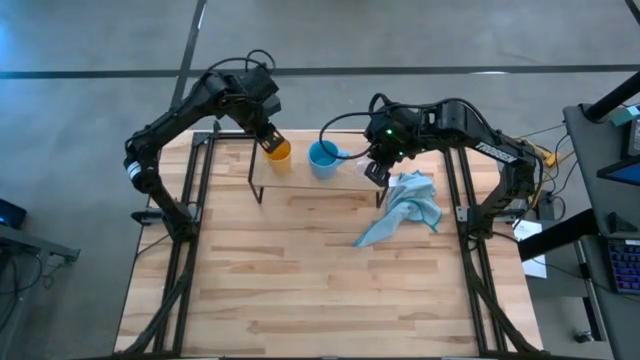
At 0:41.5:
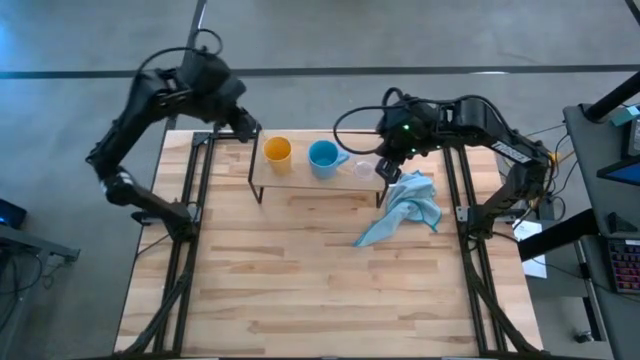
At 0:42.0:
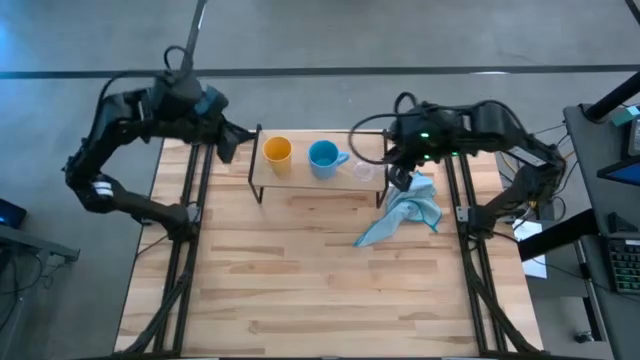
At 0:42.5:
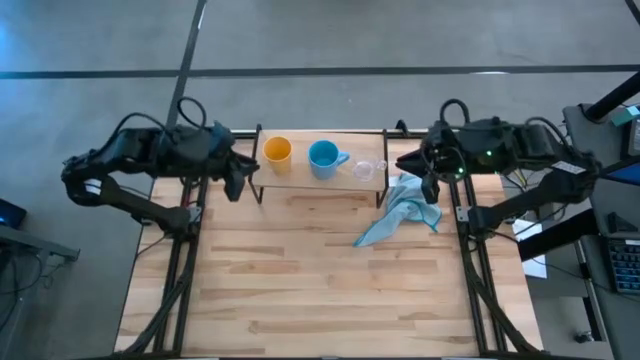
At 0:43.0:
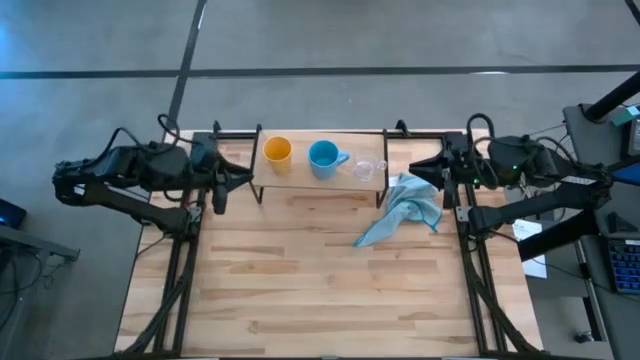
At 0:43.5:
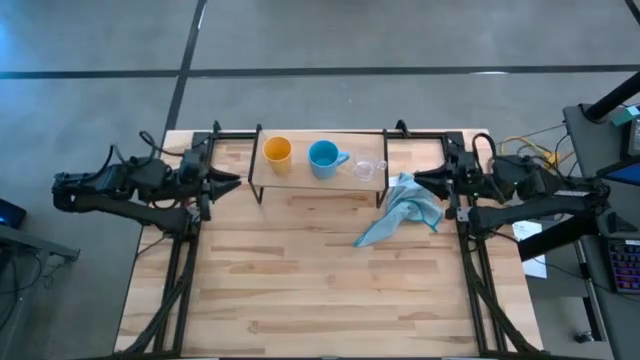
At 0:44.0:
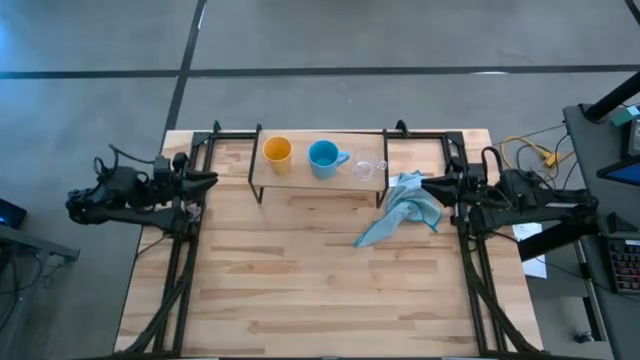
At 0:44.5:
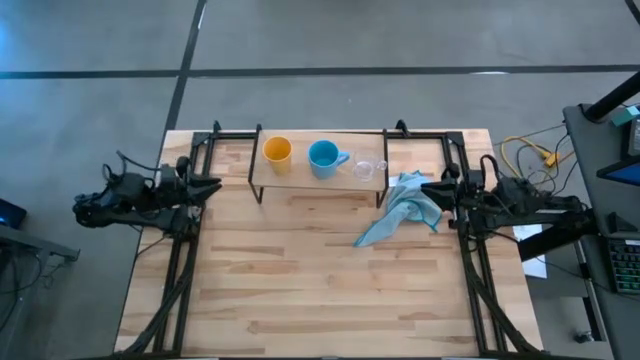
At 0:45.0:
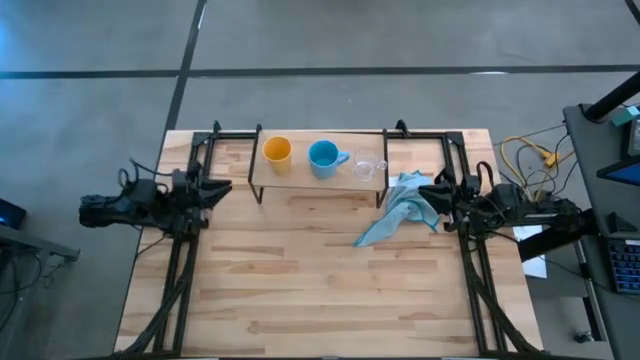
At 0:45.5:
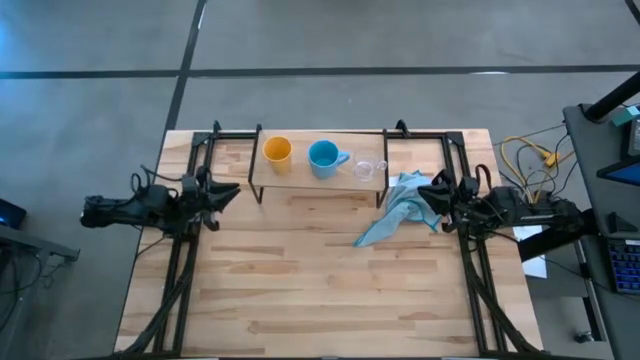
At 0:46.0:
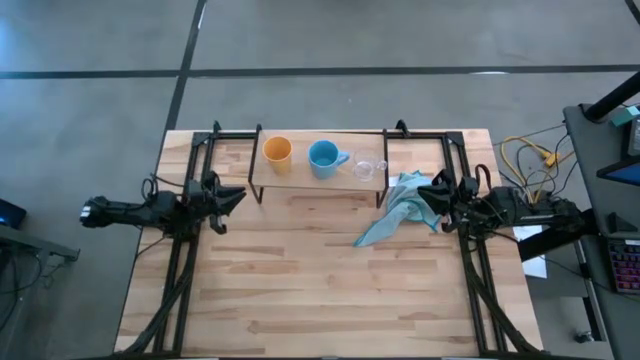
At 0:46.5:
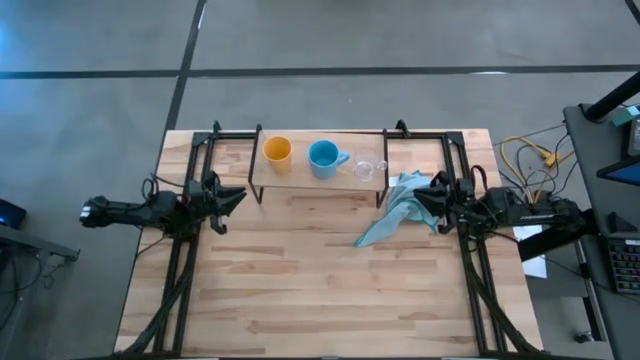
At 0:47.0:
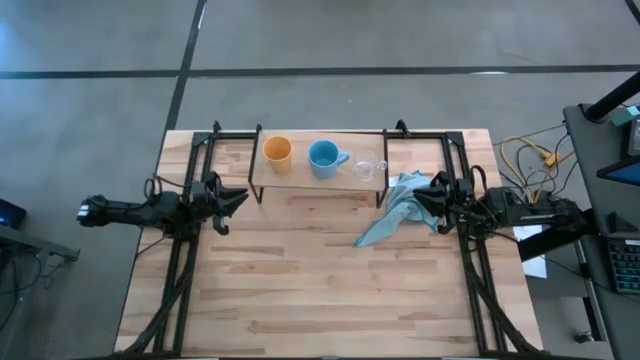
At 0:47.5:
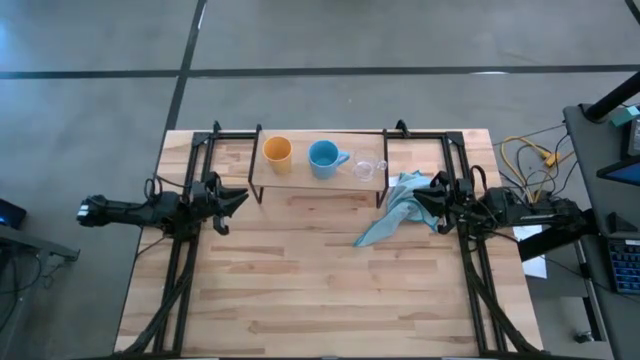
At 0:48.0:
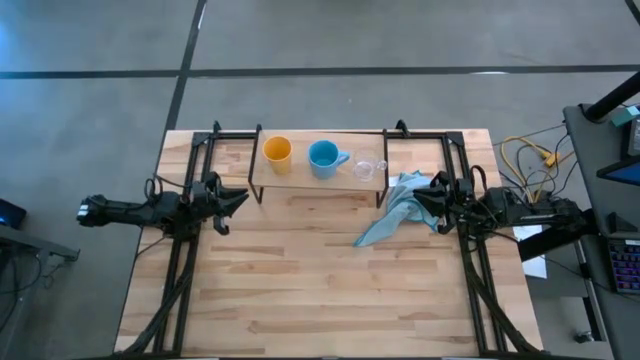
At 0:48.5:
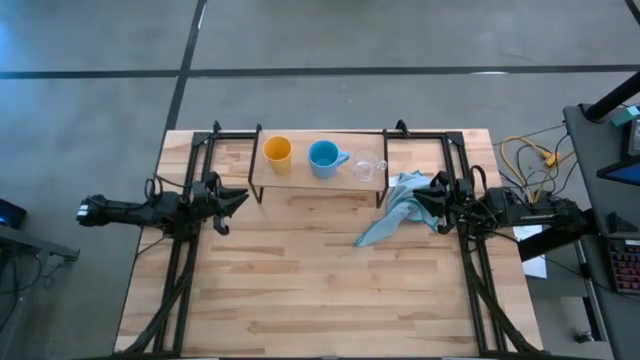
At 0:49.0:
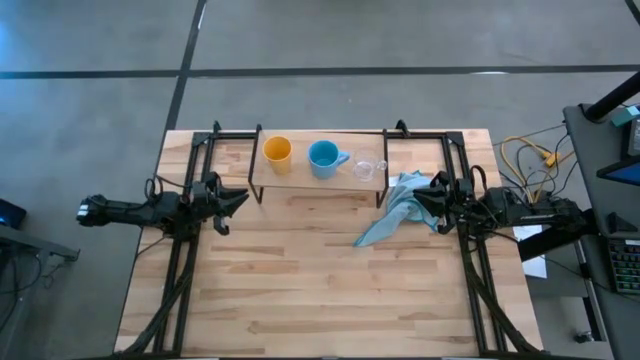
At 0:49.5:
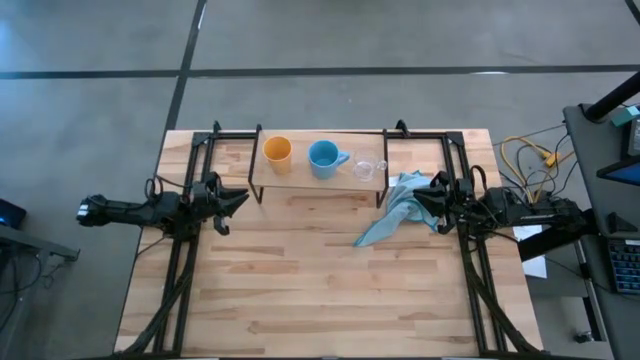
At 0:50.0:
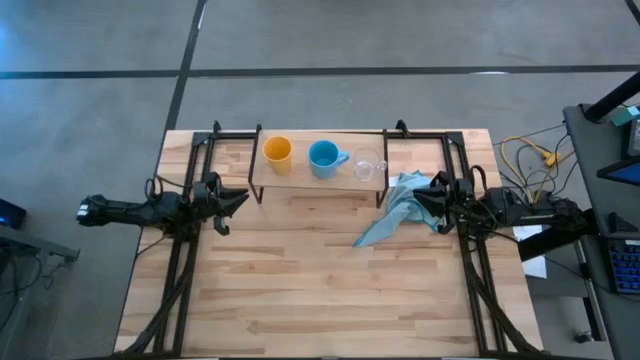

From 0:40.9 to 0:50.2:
Task: Stack small to large cups/mugs on shelf
Return to Home Position

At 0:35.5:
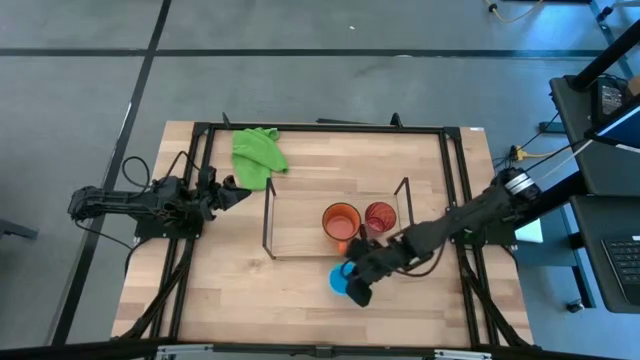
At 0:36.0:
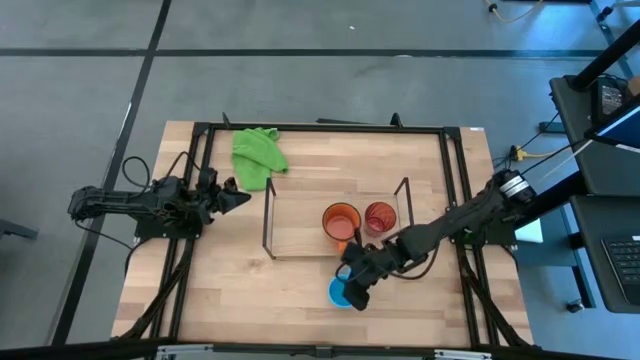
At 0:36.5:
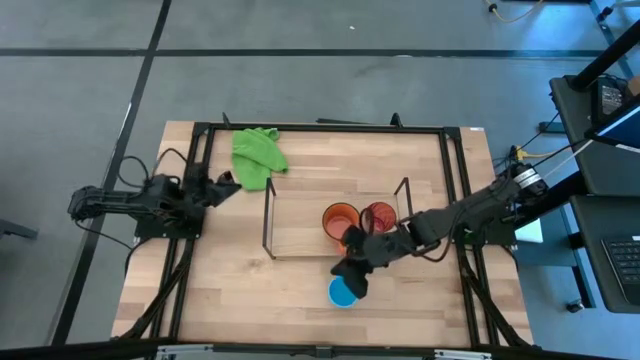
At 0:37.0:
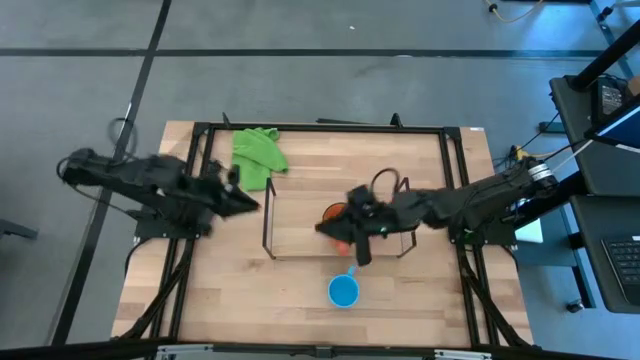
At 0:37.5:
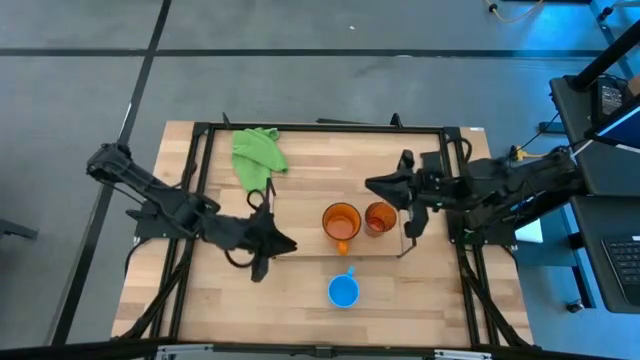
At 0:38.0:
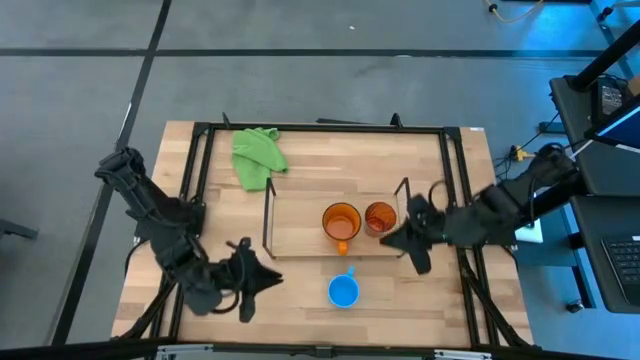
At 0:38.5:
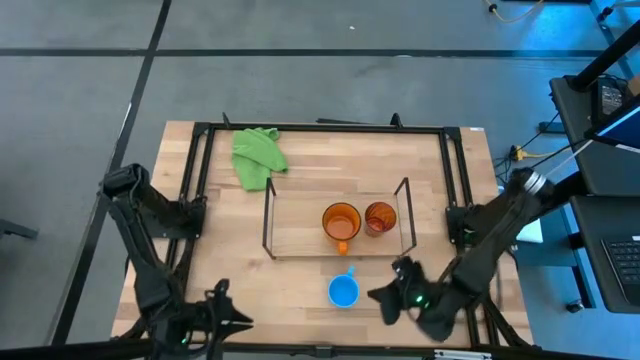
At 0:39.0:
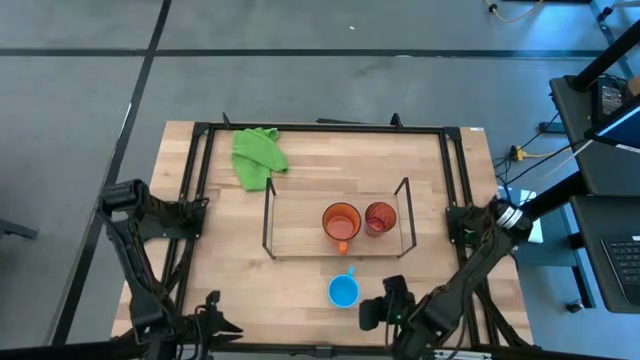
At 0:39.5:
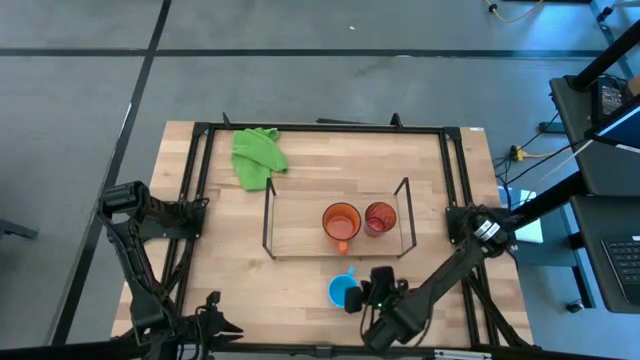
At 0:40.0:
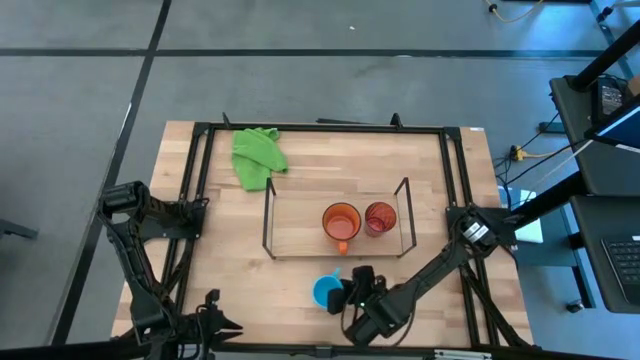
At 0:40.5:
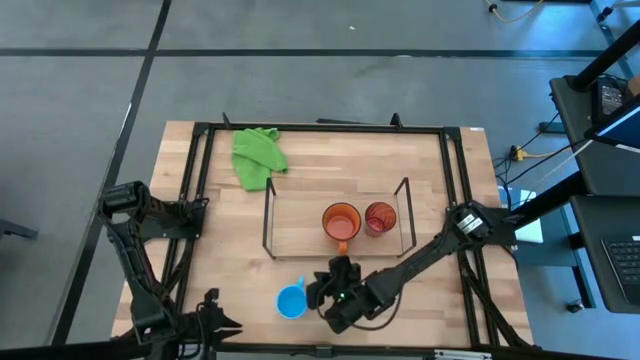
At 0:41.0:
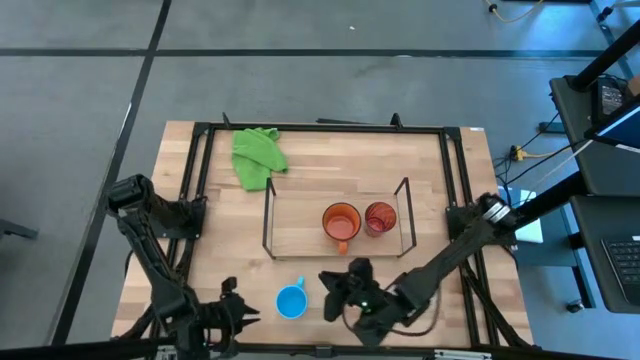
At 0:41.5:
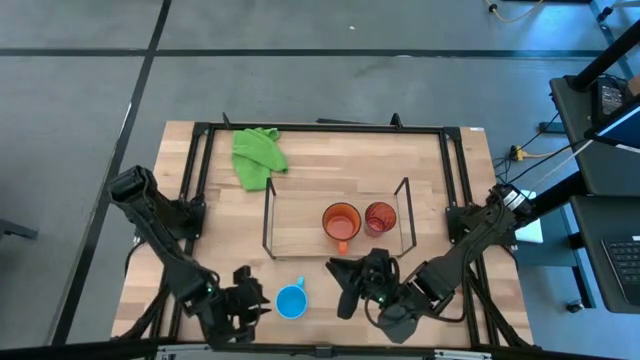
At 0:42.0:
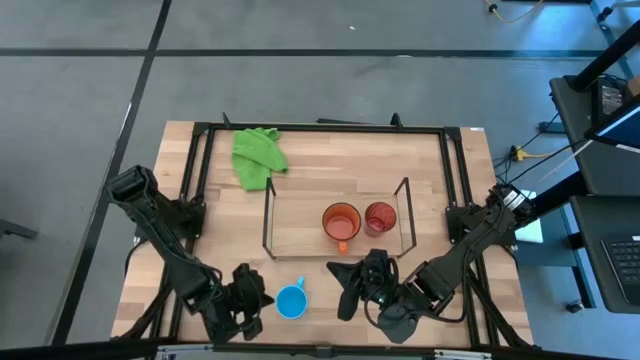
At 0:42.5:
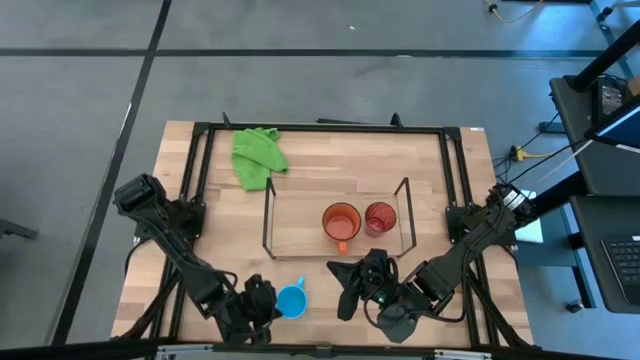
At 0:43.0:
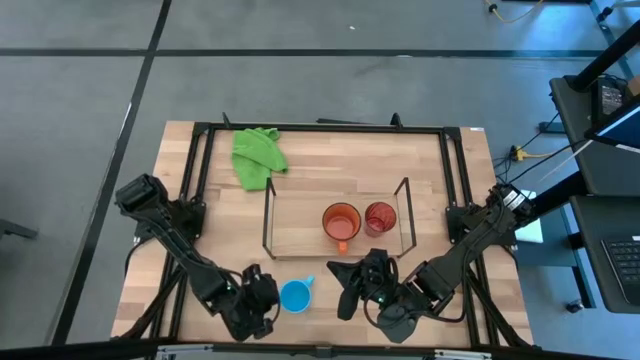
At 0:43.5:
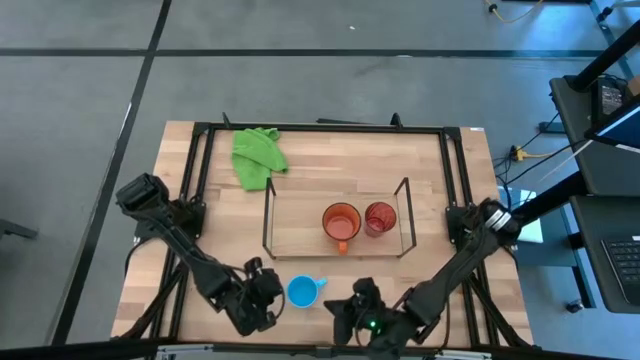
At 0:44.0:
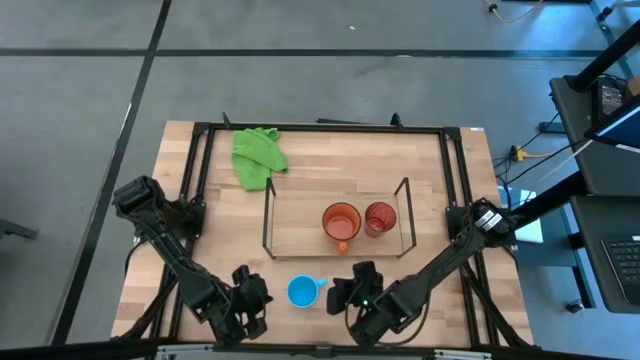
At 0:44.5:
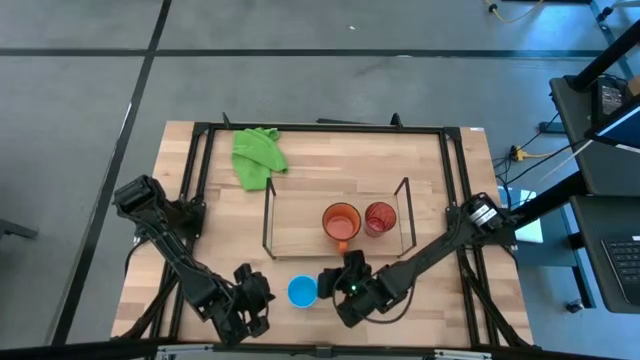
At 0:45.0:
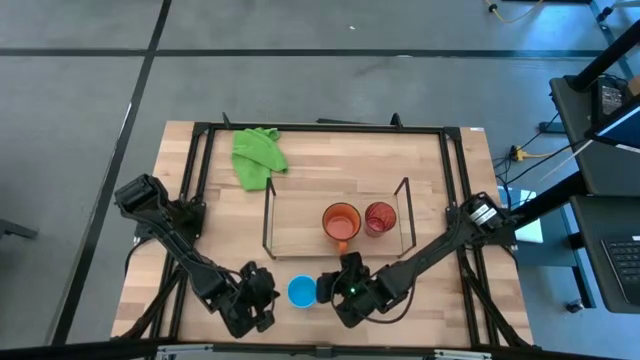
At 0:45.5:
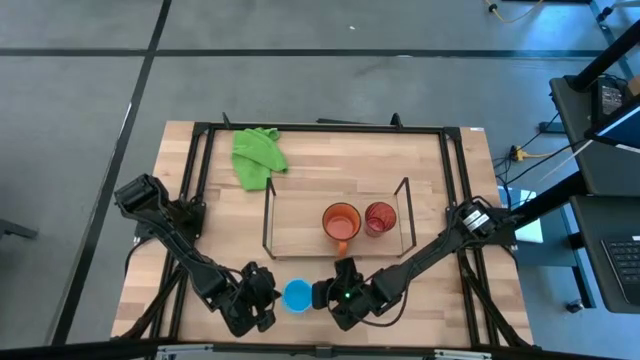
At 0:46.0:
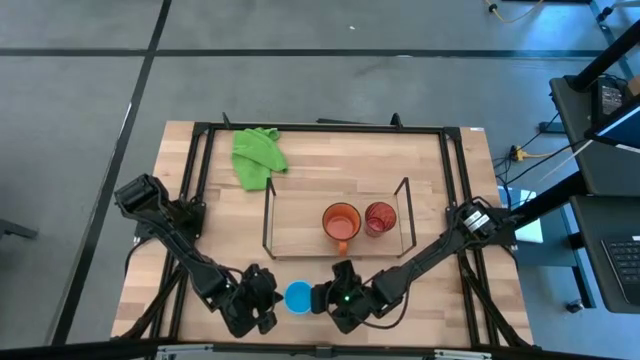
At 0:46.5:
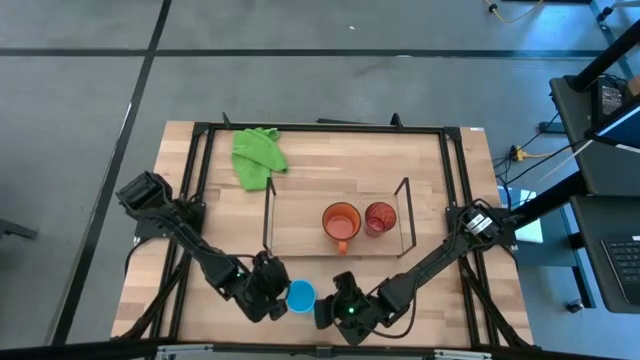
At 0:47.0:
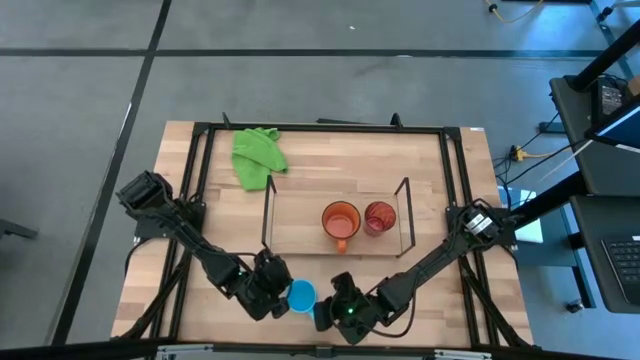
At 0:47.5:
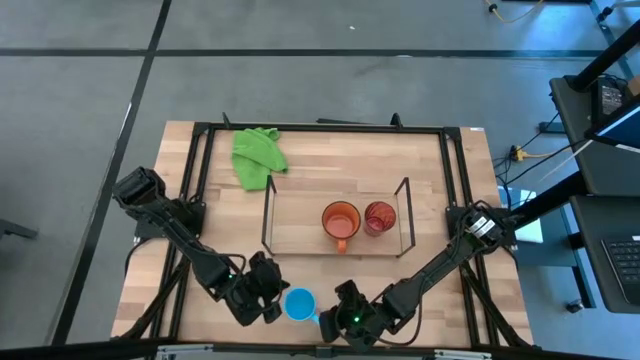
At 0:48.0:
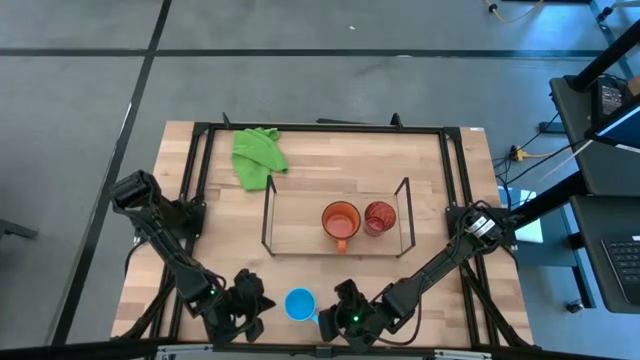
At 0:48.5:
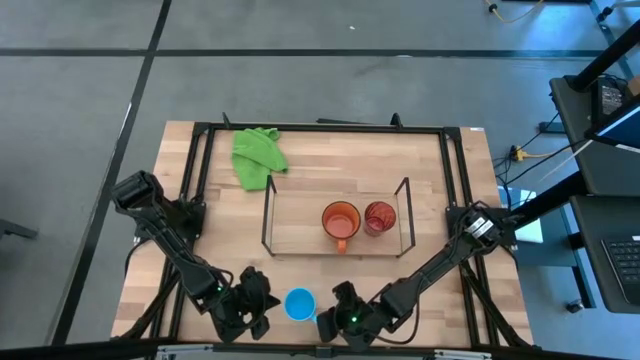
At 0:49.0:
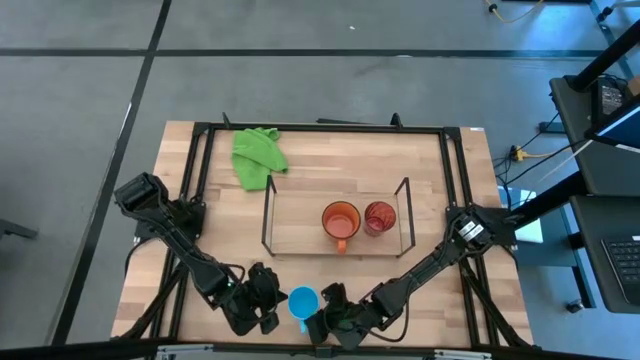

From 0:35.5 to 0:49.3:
Task: Stack small to large cups/mugs on shelf
Put the blue mug on the shelf
